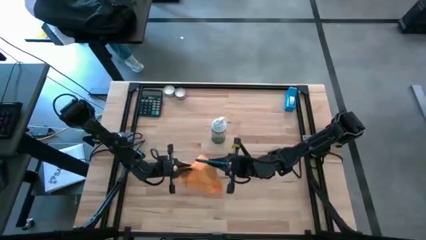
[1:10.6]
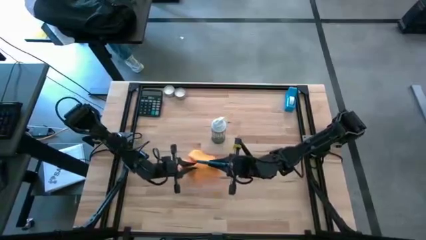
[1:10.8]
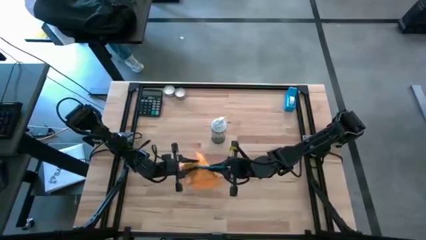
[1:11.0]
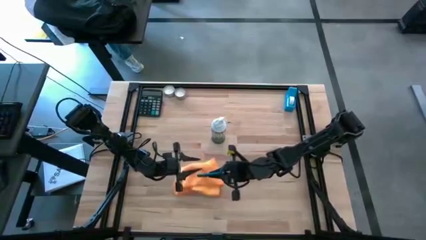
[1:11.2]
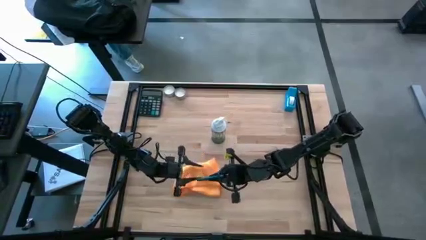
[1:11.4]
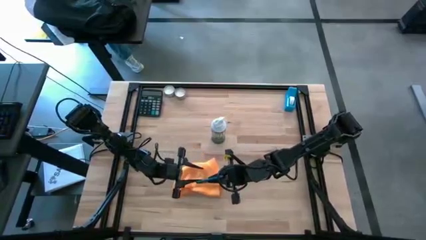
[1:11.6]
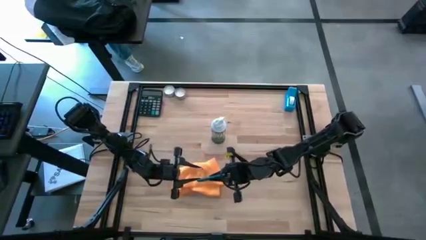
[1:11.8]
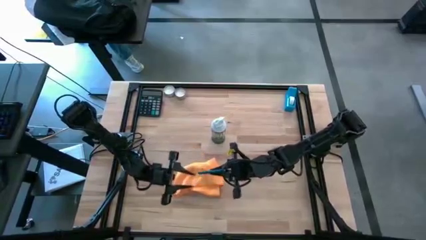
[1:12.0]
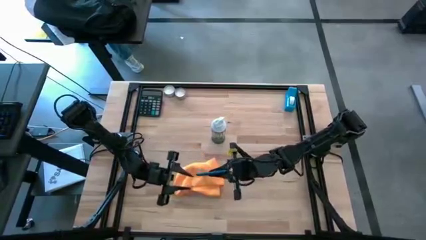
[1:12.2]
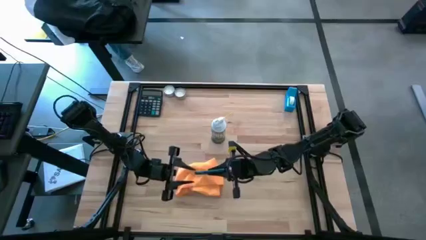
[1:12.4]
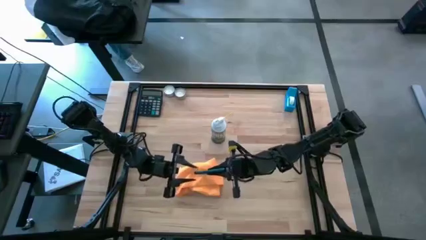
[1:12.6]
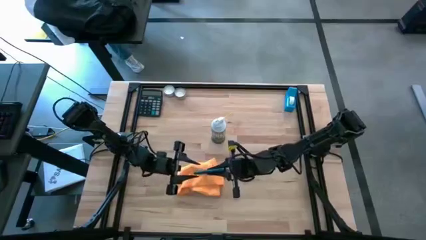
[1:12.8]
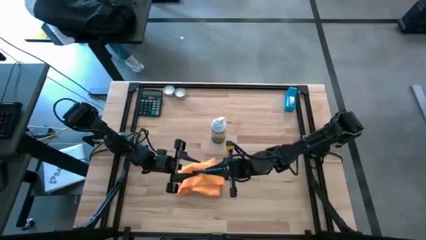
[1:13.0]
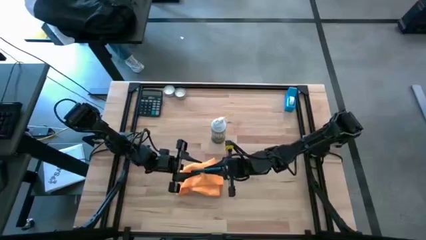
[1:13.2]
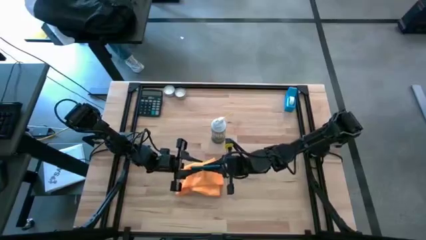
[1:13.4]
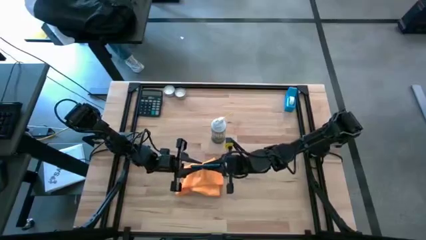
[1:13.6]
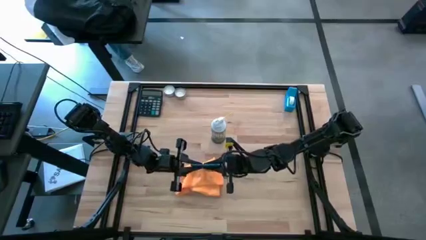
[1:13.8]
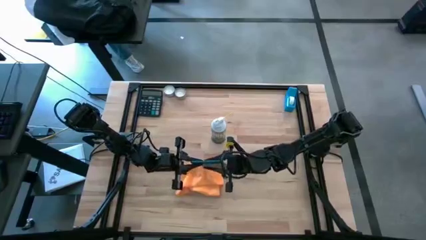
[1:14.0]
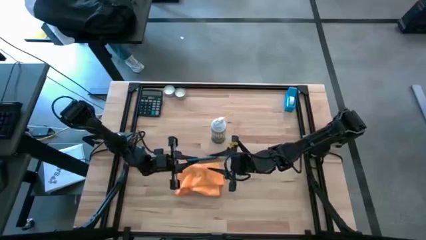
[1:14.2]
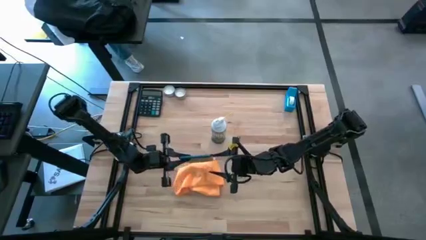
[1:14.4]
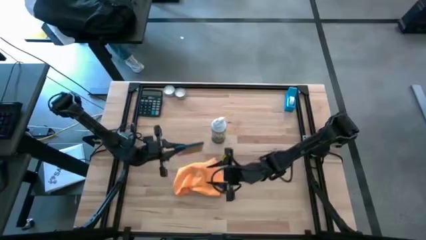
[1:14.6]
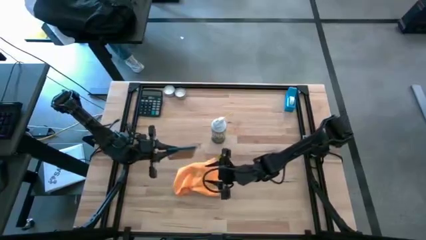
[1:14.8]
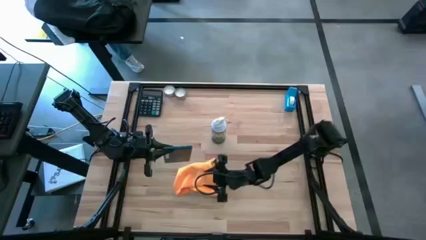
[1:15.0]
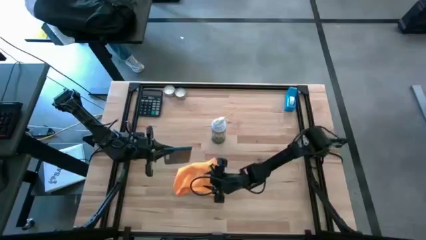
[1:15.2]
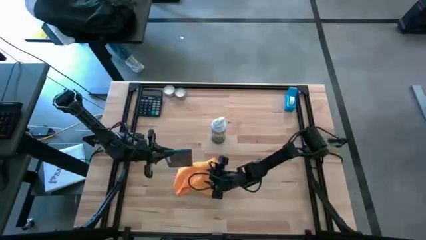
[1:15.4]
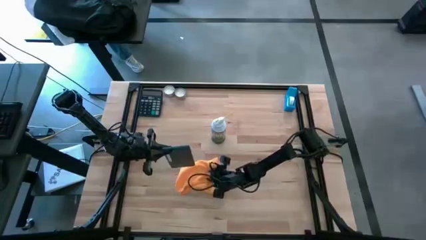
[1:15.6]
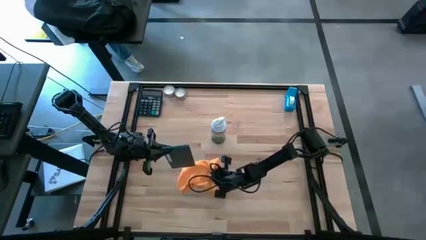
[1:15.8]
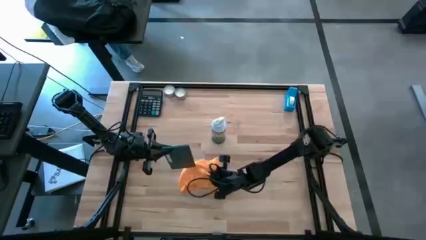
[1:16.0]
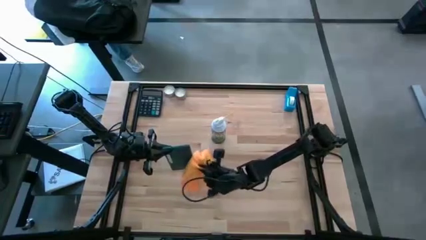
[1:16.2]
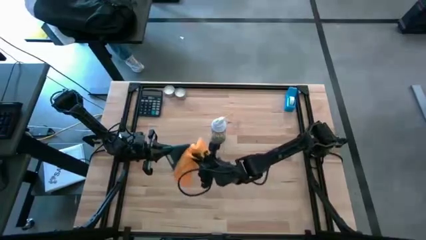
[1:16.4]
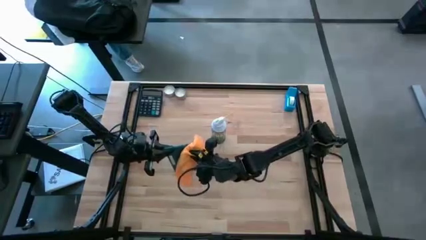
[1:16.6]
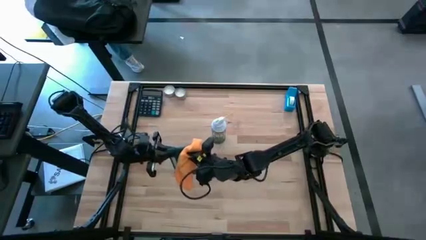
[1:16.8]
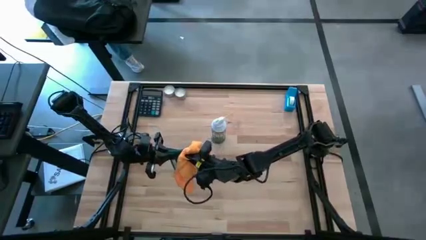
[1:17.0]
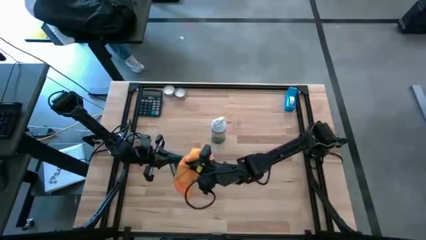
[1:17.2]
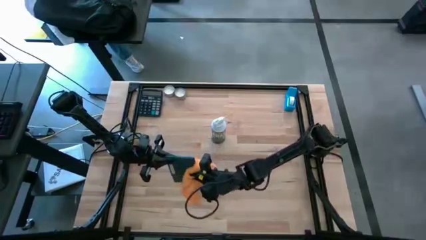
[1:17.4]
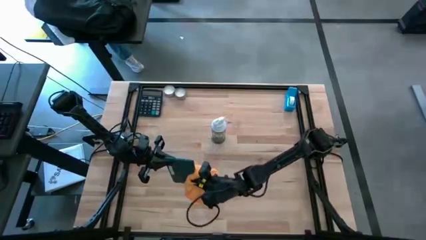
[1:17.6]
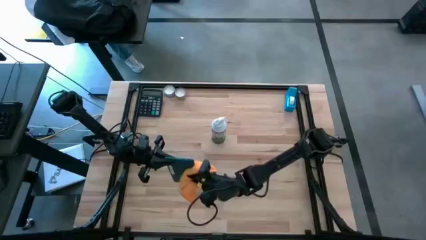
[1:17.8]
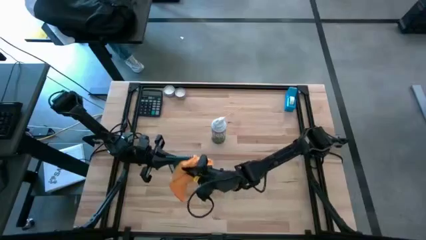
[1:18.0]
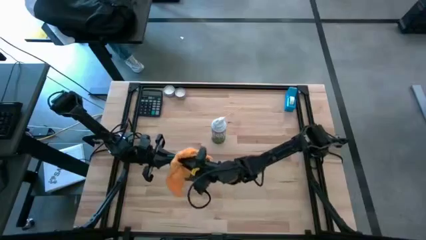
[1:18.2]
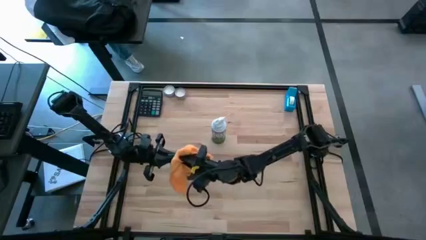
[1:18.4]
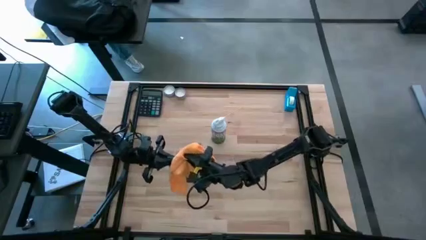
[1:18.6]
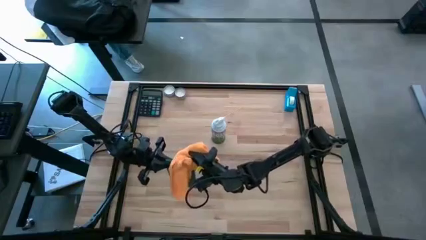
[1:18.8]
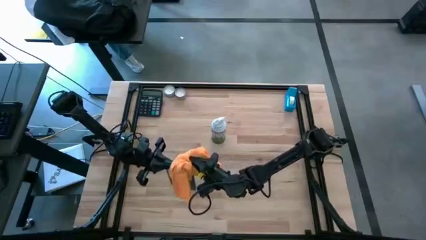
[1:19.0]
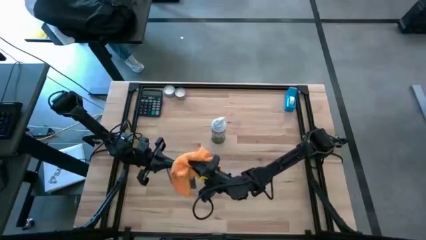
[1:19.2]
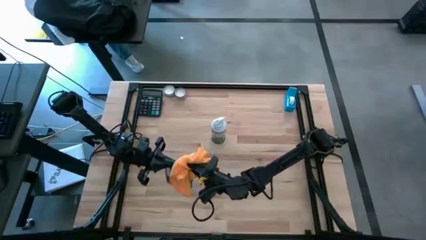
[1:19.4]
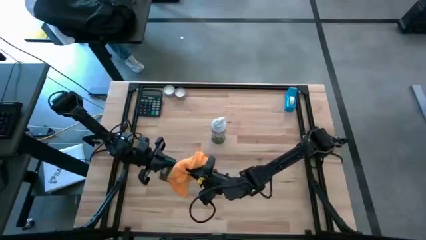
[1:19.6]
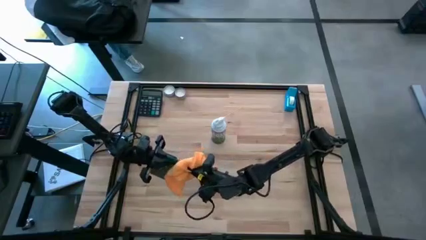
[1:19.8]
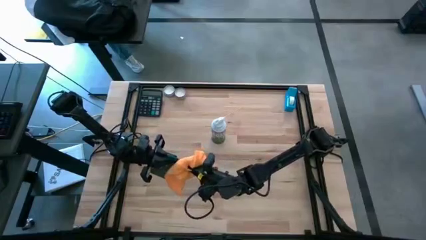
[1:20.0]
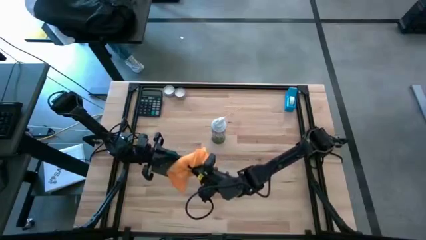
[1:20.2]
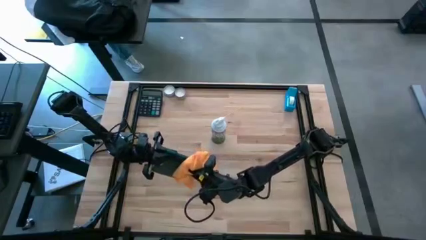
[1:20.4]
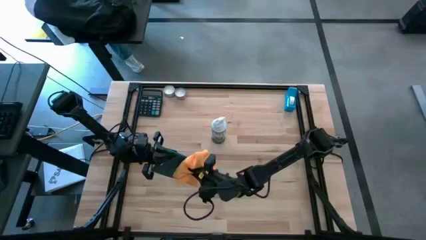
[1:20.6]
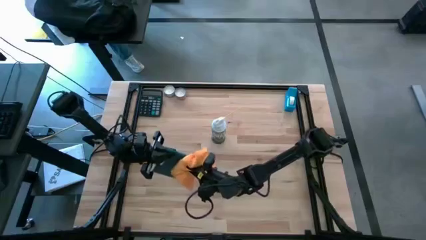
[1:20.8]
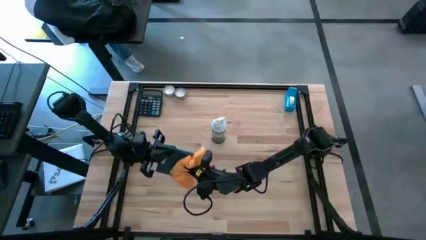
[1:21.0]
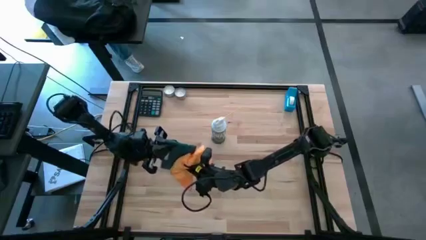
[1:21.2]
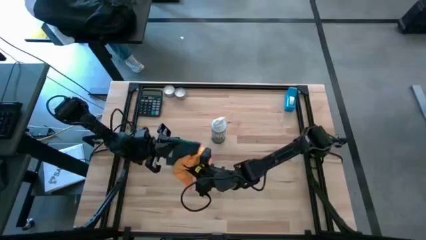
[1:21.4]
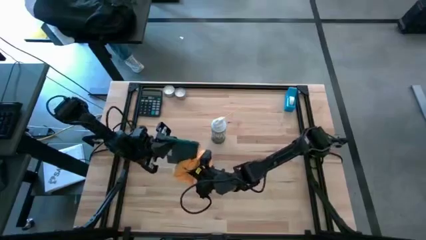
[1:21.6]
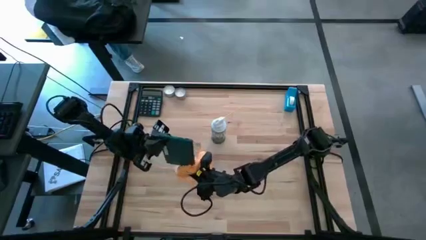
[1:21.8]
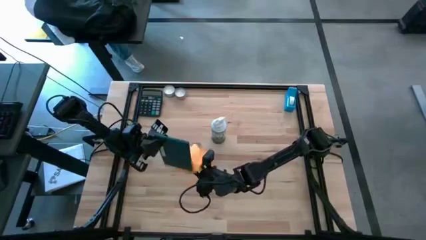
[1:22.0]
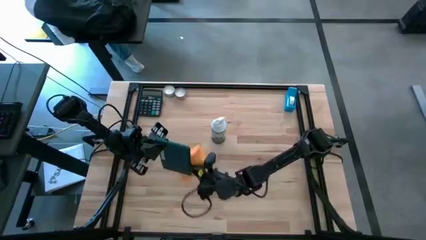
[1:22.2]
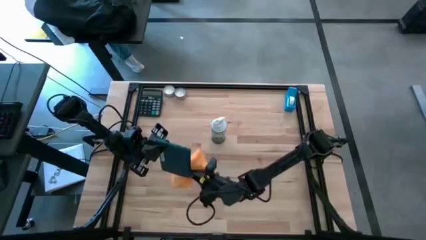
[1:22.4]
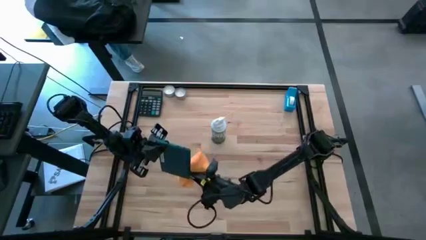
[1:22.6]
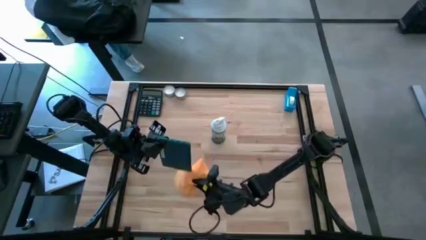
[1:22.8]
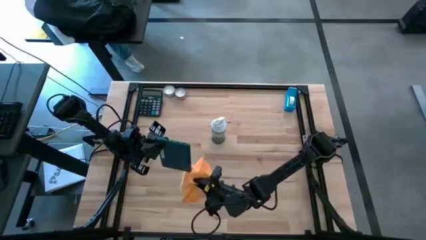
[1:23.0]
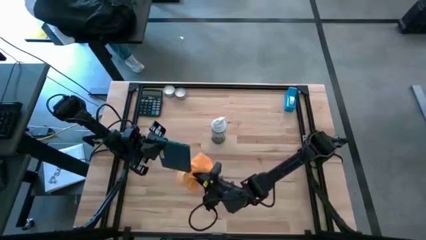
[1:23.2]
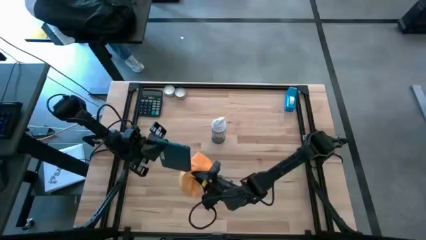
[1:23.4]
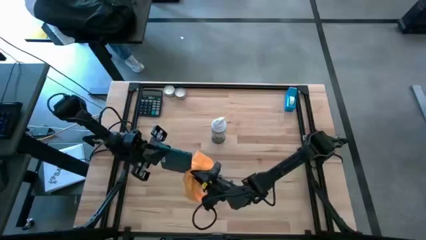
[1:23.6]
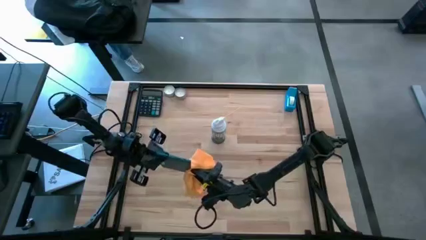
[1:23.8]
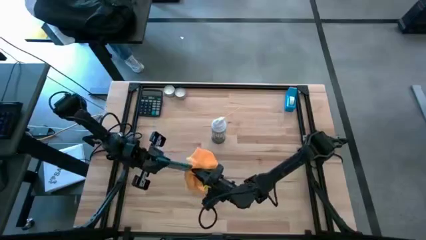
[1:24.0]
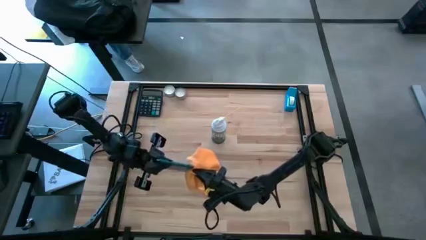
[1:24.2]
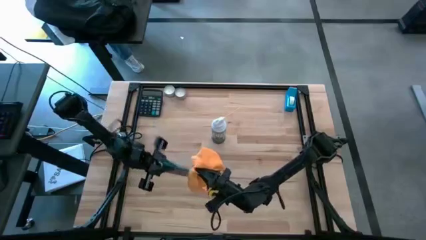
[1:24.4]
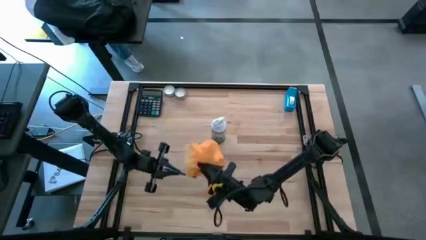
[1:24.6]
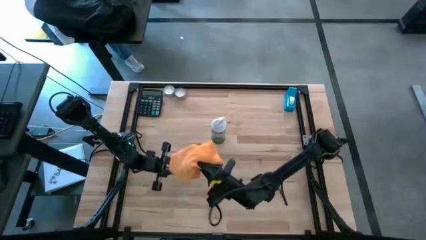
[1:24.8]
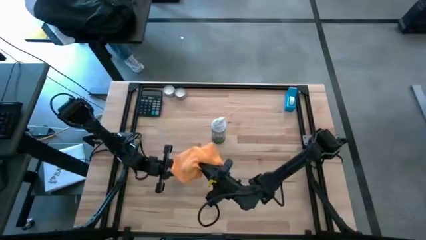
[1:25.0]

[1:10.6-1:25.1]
Task: Apply microfiber cloth
Wipe the back of the blue tablet using the orange microfiber cloth

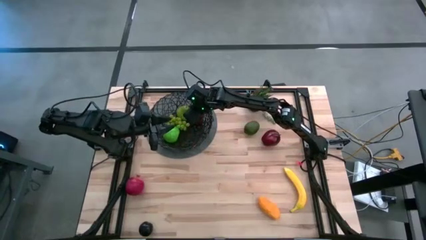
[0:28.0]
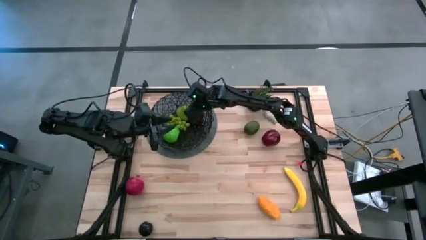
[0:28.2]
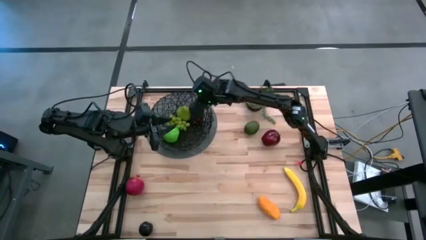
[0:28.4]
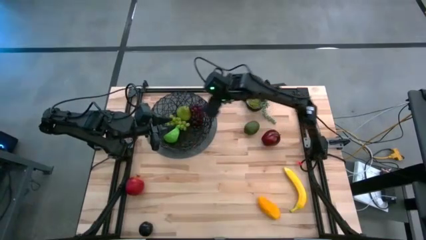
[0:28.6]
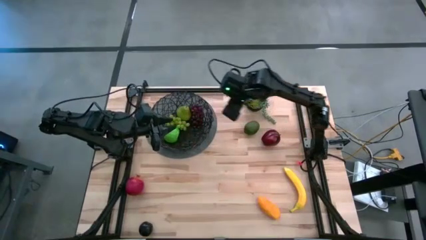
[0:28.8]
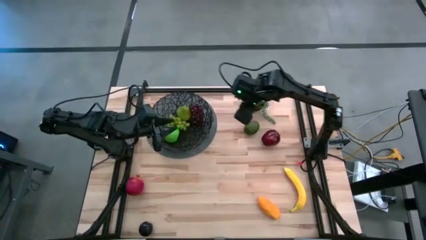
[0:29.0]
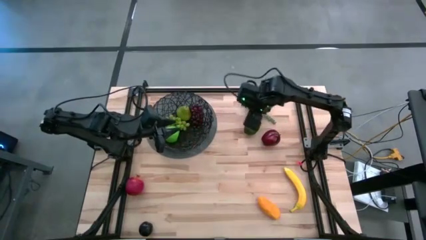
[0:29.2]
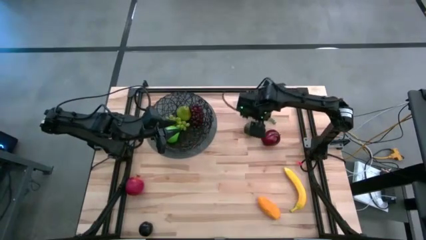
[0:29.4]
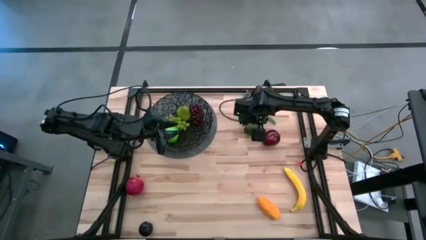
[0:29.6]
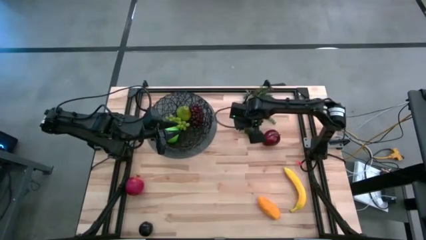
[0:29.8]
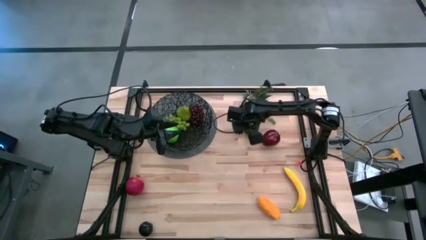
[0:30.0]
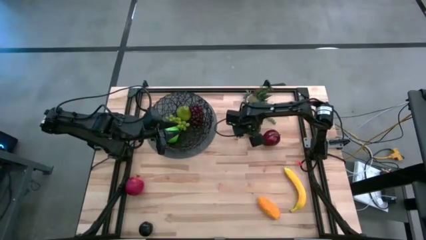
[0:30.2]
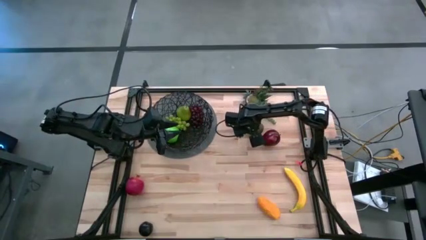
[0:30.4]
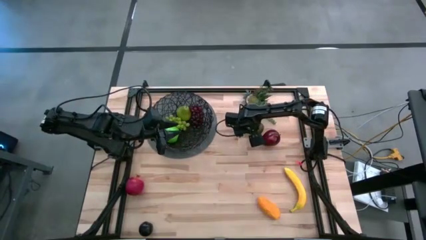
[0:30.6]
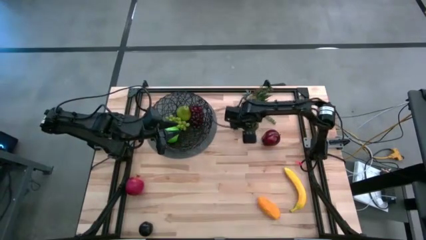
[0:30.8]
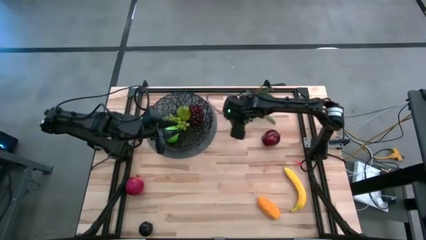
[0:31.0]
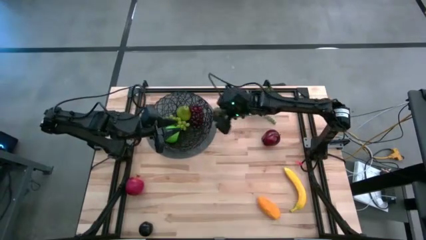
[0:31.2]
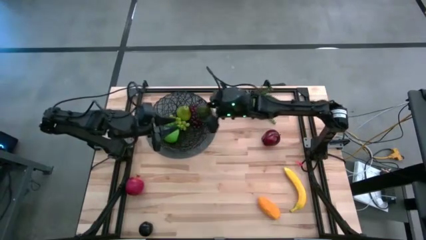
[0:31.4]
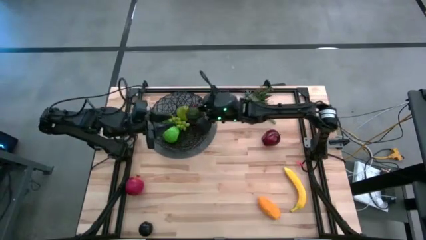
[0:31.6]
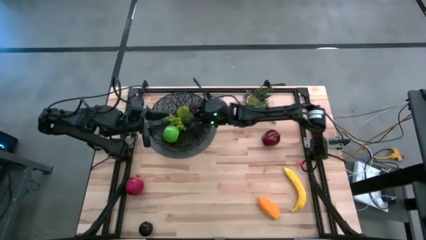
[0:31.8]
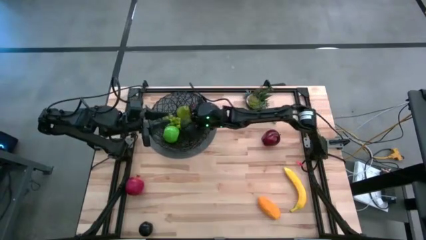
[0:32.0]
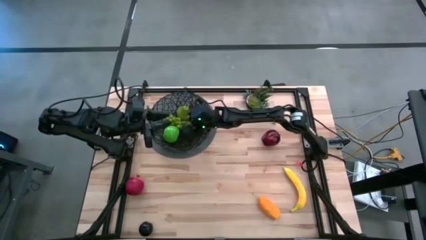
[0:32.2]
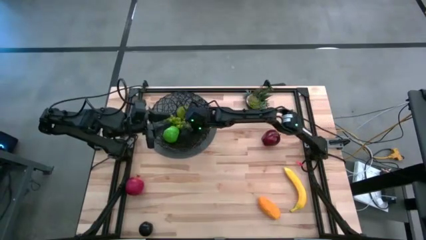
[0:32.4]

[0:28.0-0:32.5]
Task: Build produce basket
Put the green lime into the black wire basket
